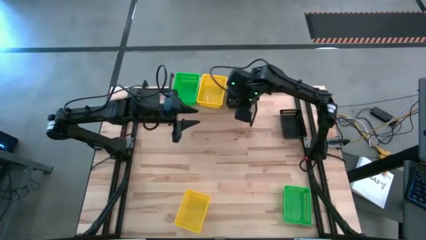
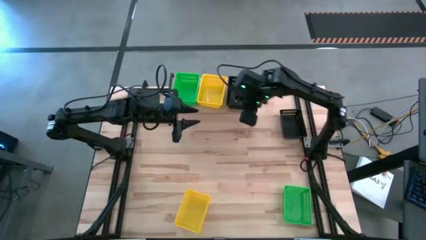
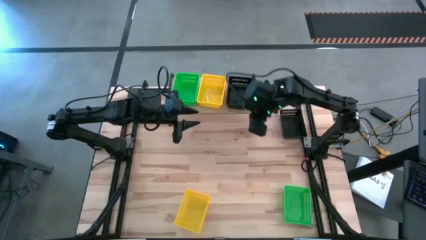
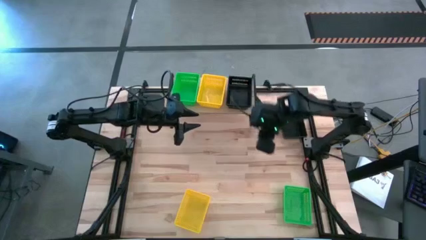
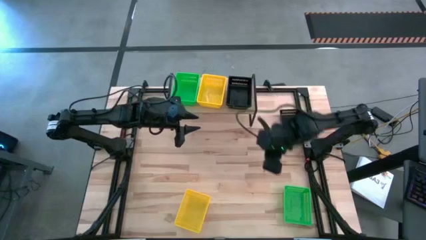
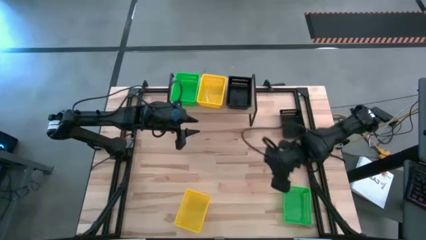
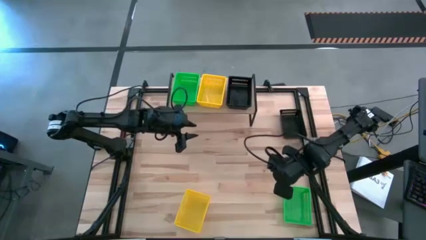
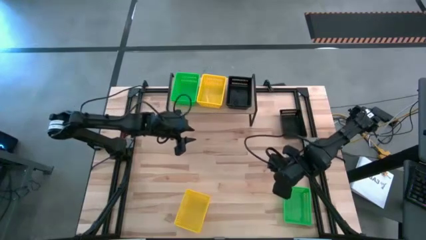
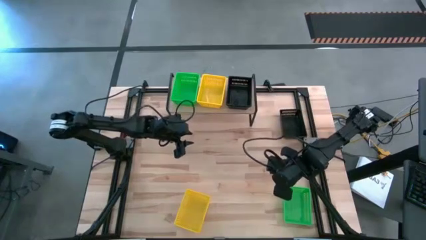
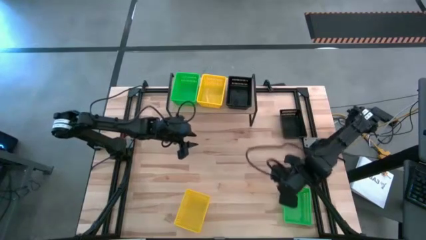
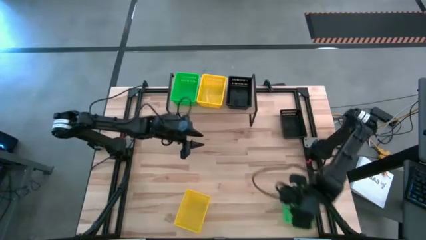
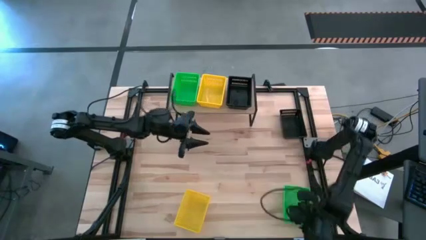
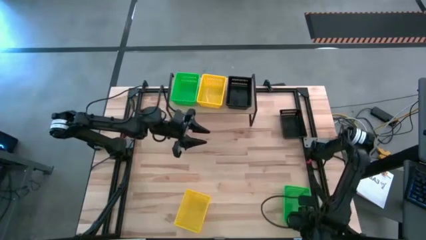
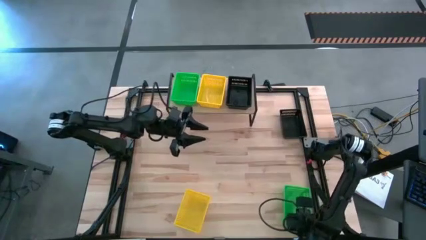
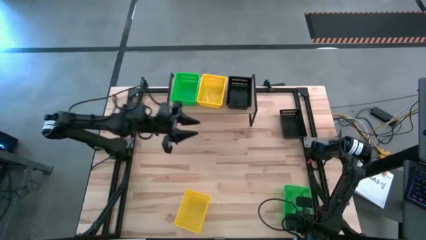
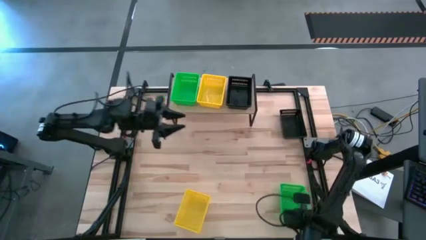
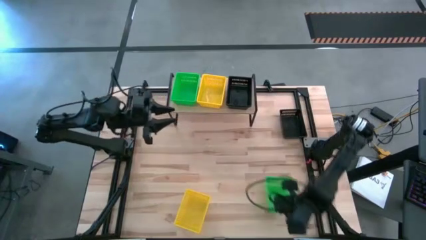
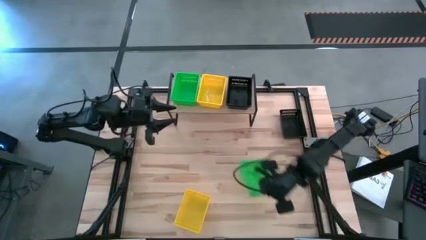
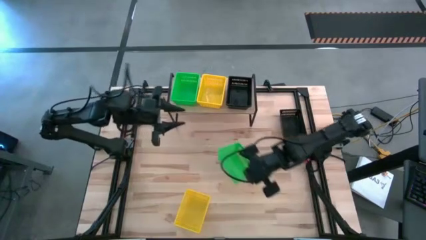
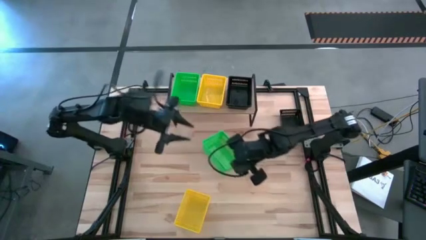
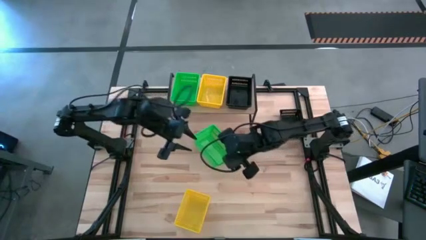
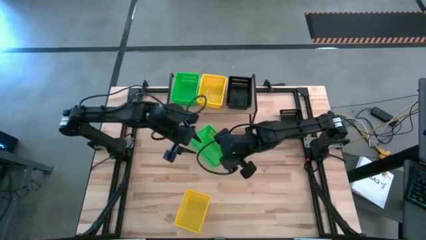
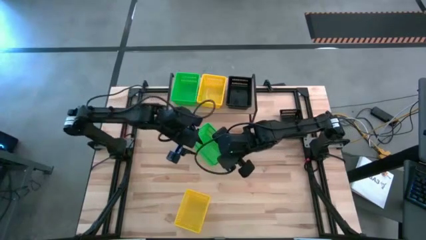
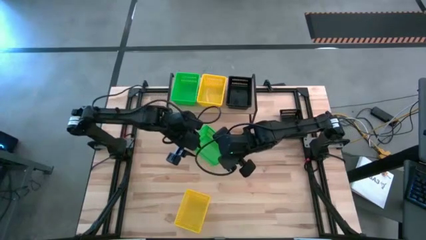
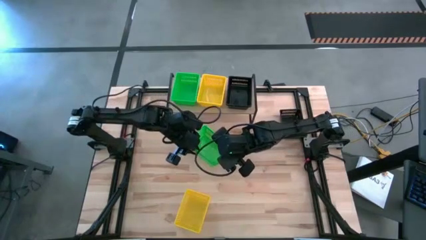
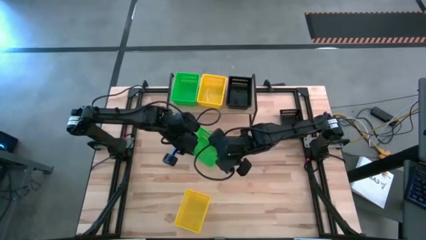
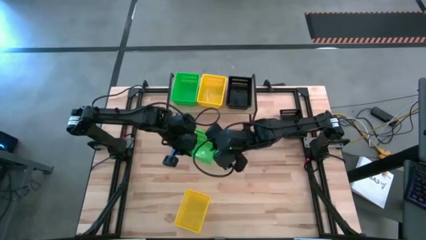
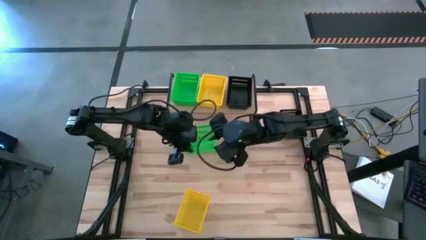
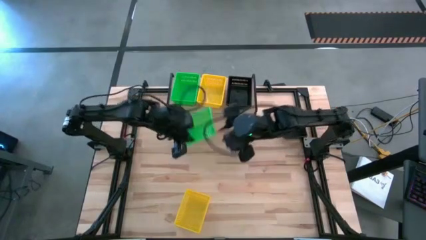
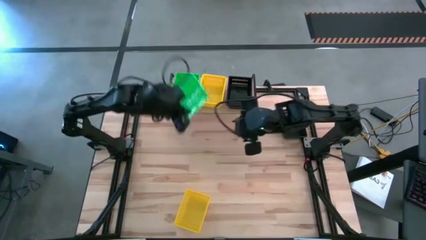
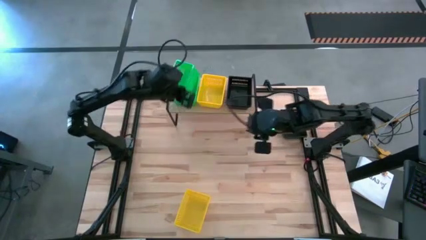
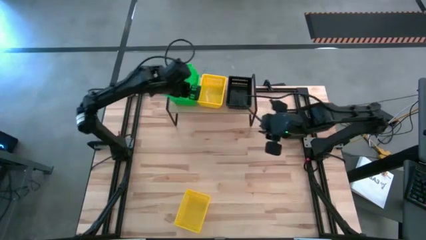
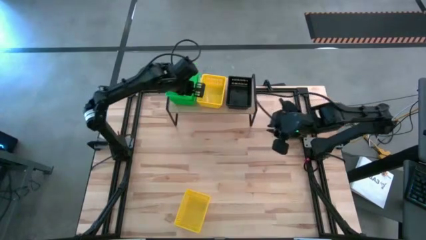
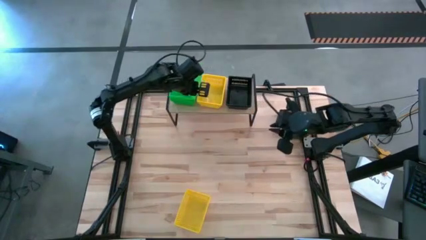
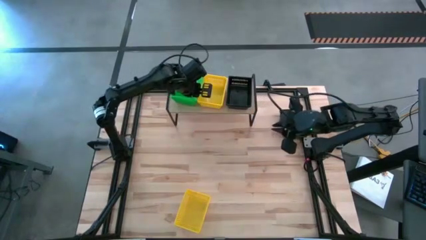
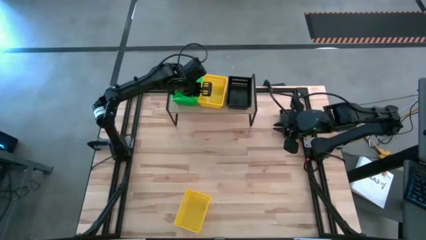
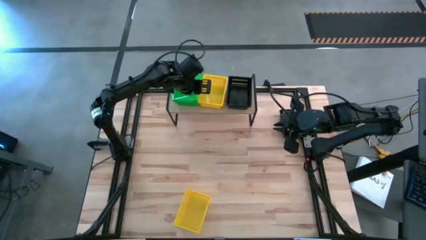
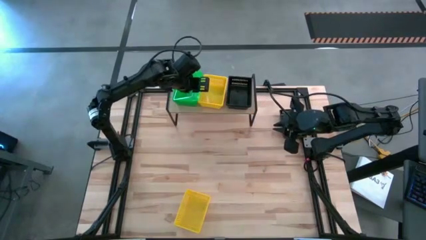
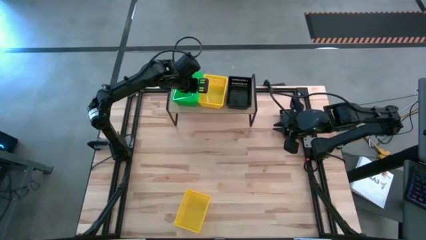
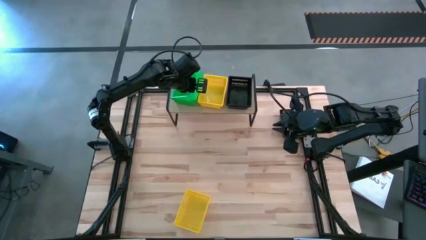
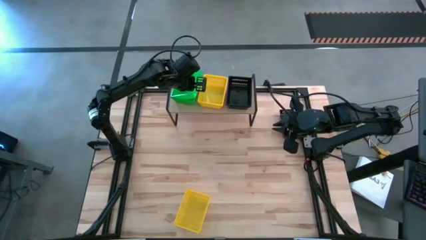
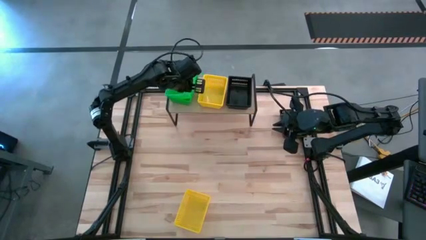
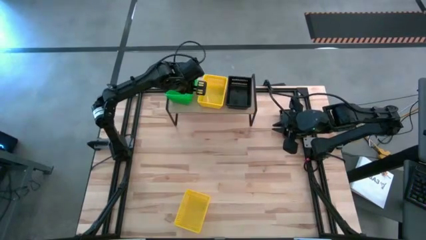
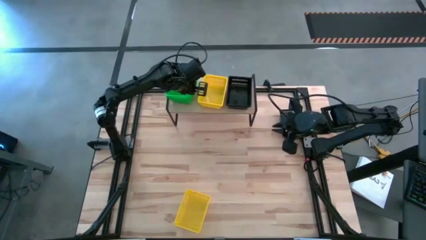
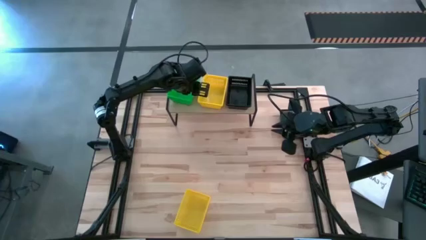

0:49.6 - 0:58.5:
Task: Stack baskets on shelf by color
Stack the green bin on the green bin on the shelf

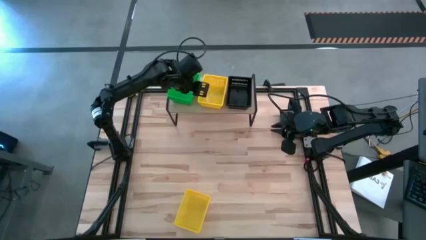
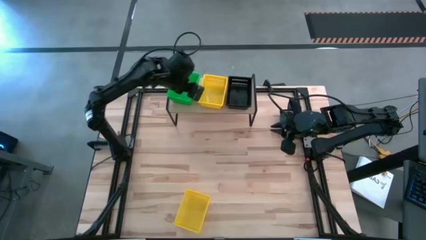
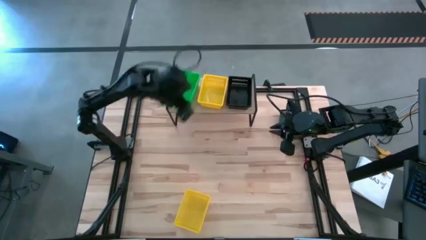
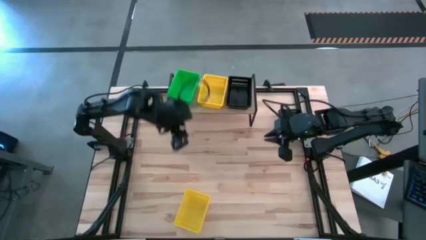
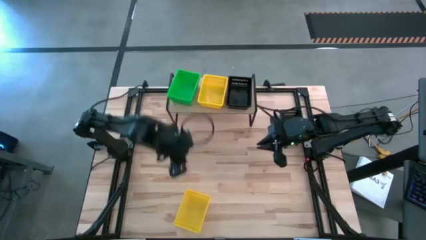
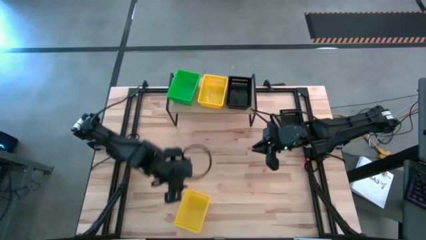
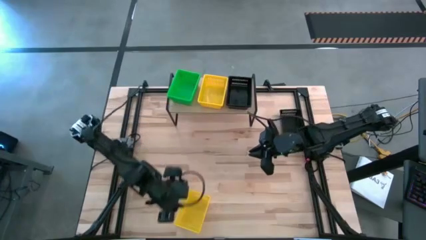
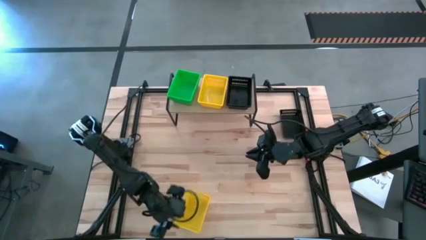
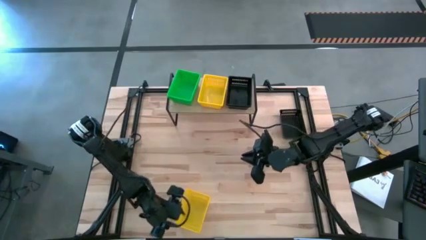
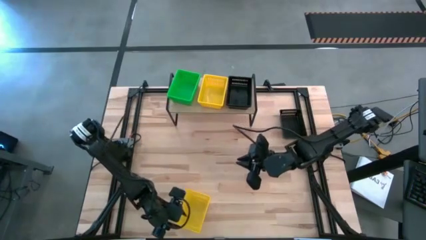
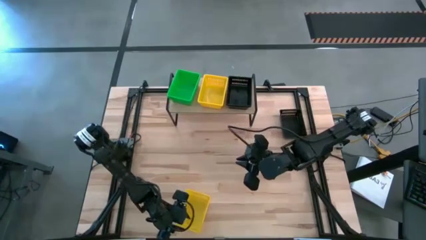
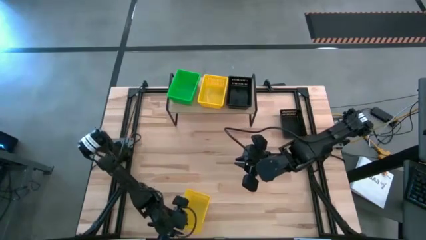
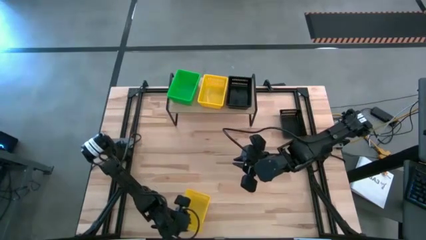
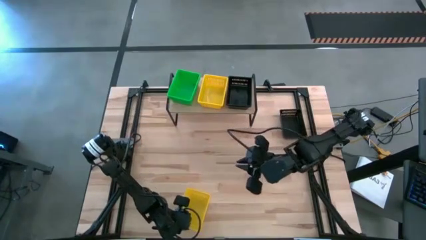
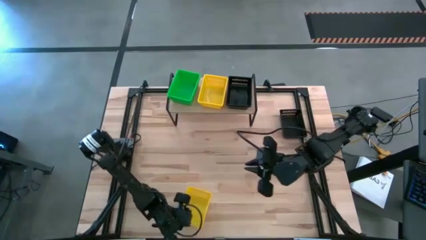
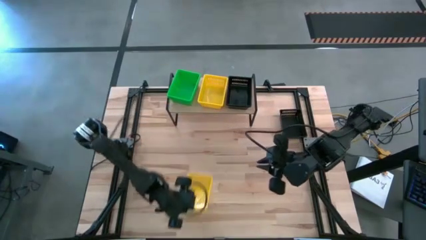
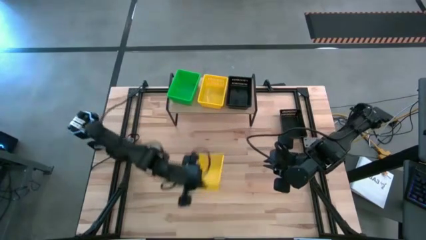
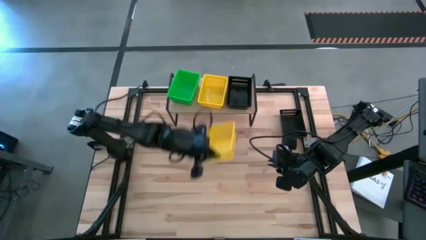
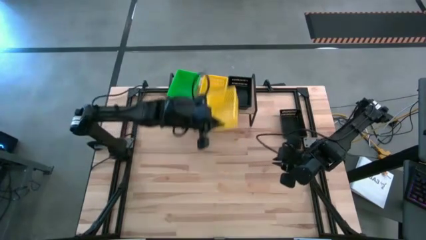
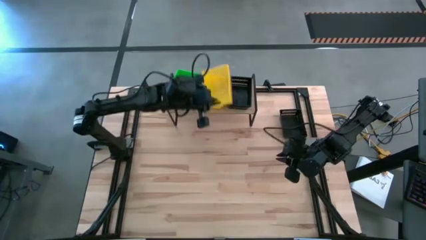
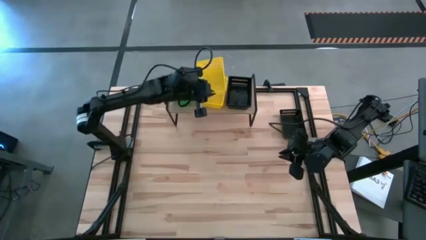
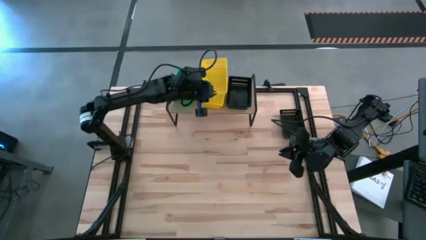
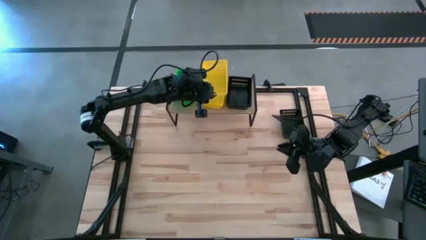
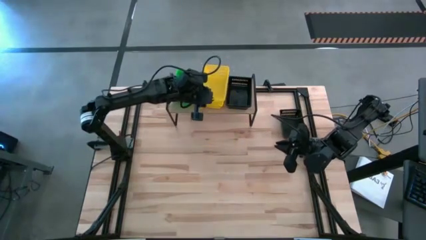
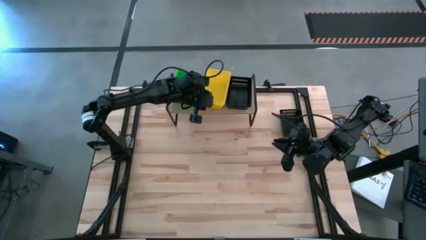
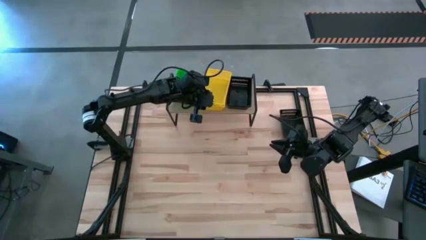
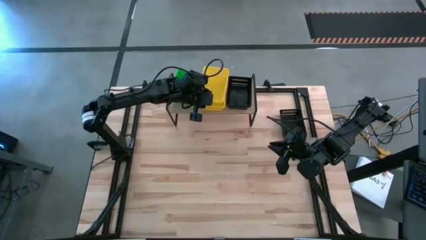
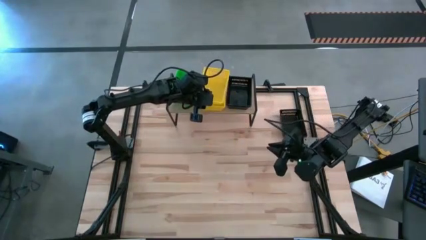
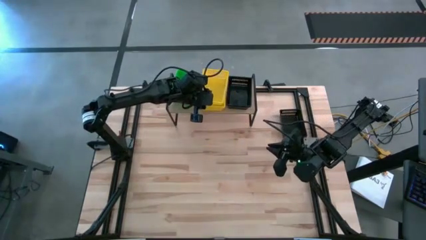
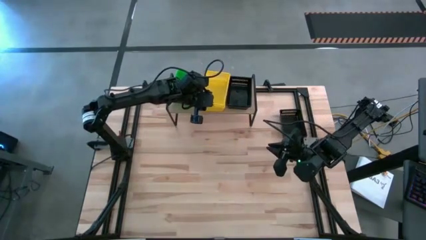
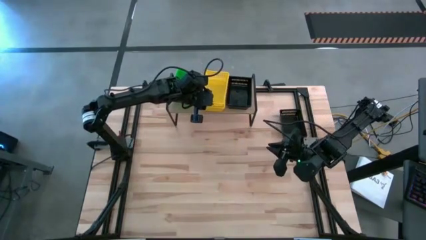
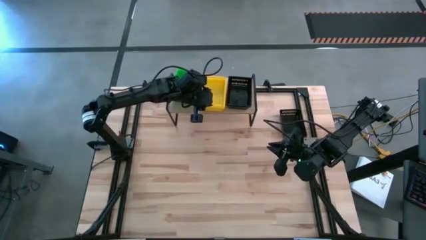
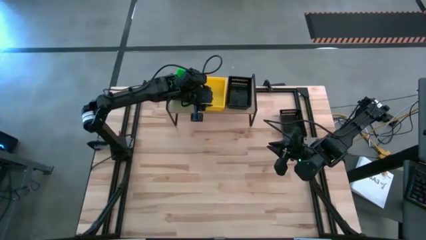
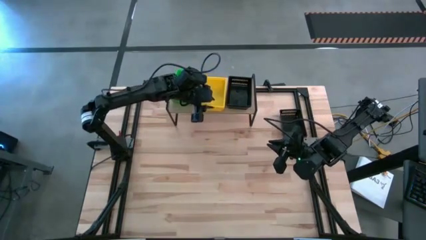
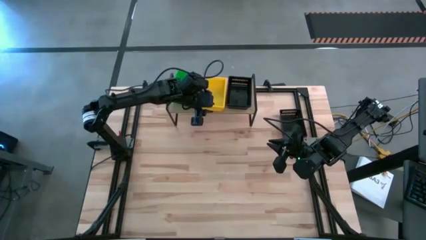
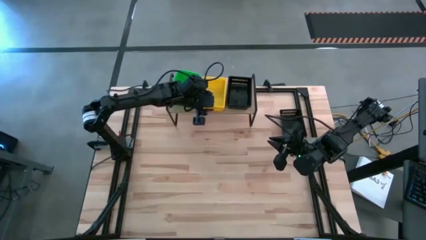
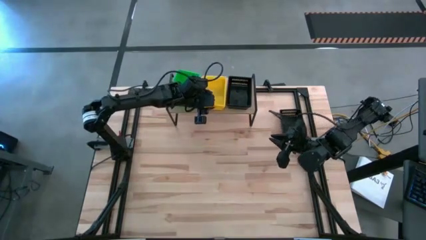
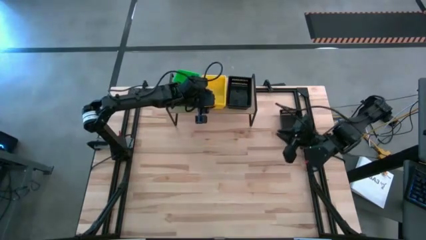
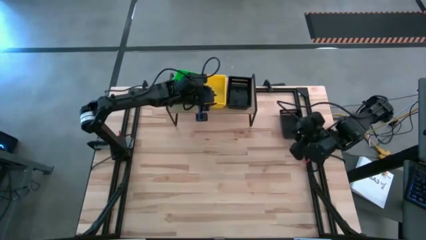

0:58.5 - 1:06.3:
Stack the yellow bin on the yellow bin on the shelf
